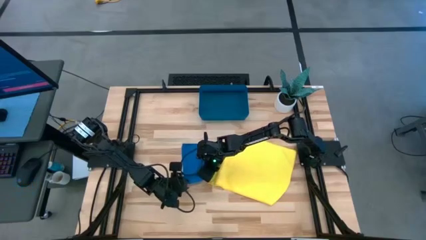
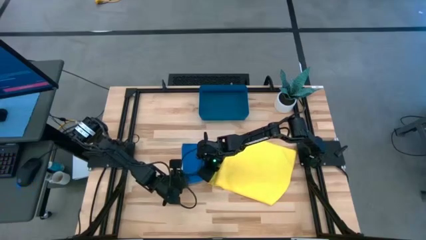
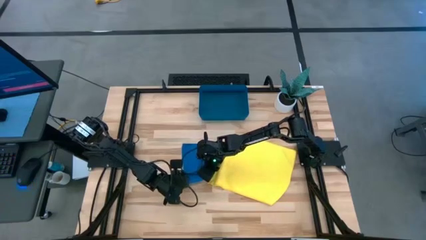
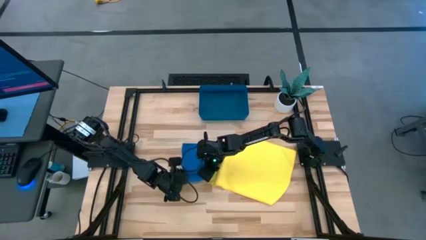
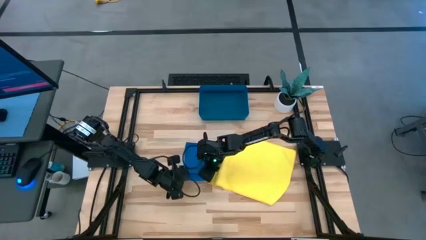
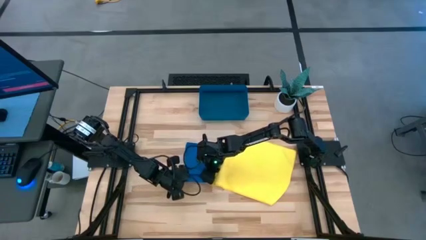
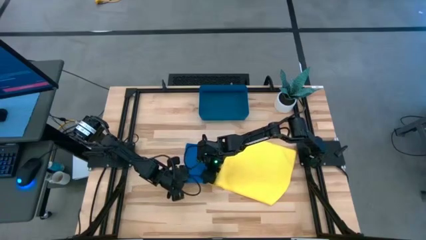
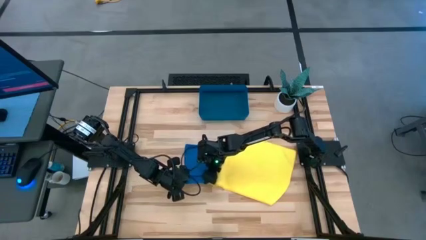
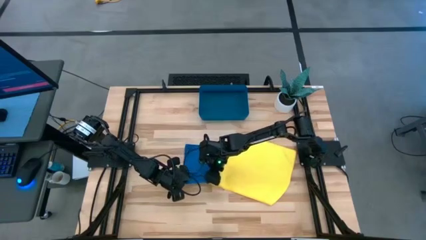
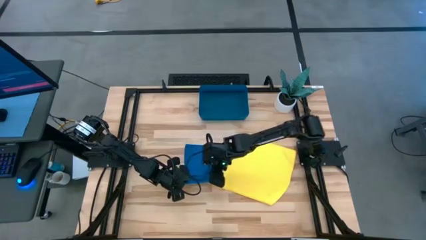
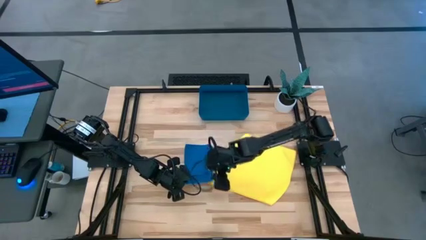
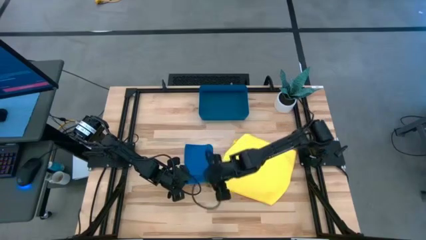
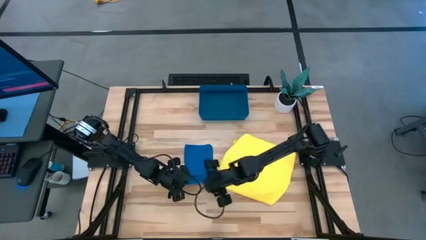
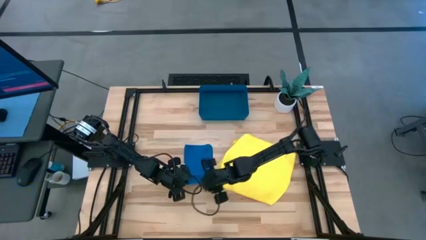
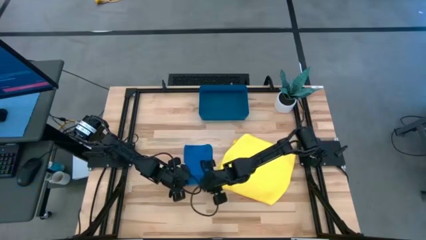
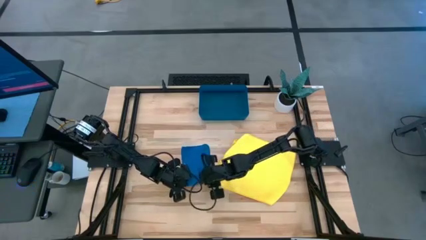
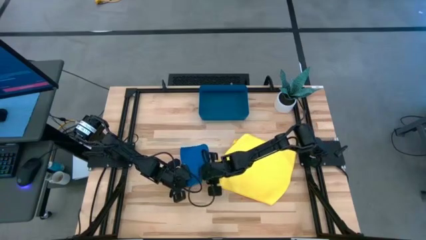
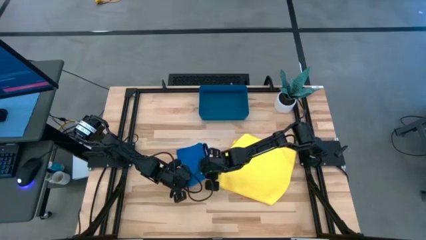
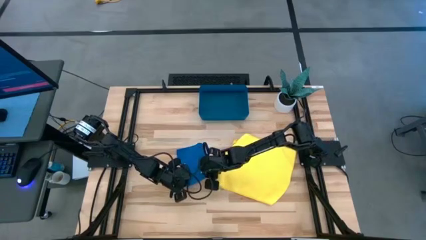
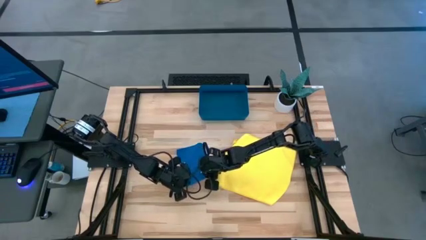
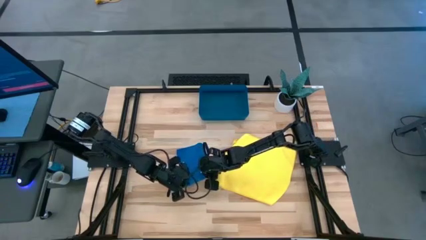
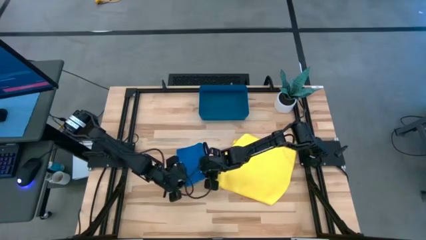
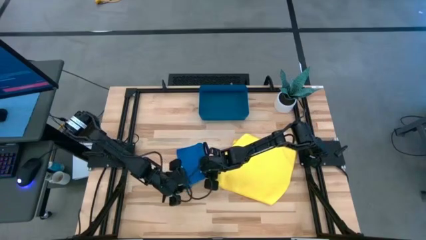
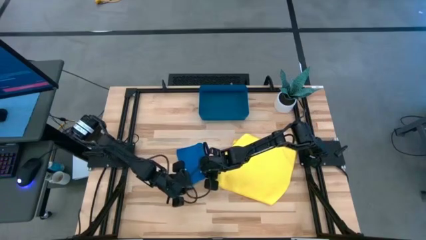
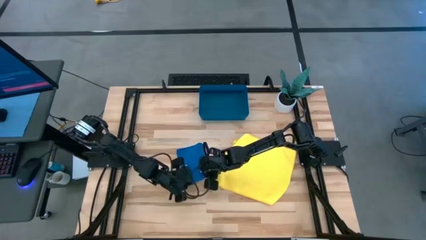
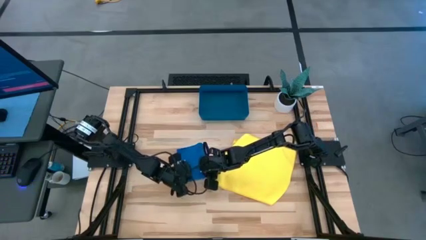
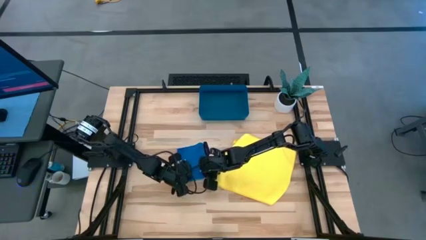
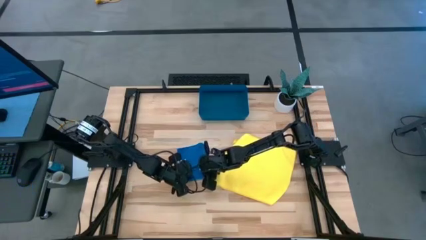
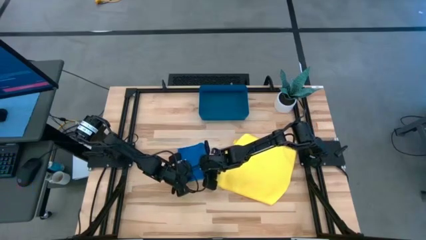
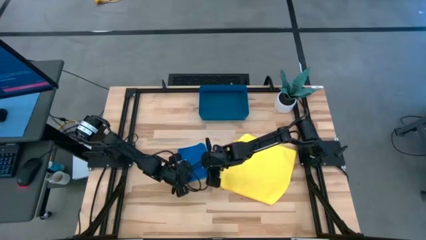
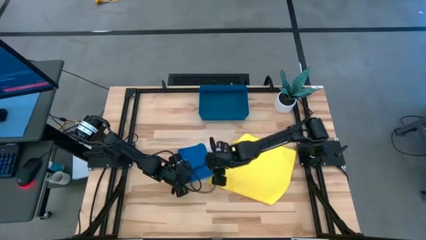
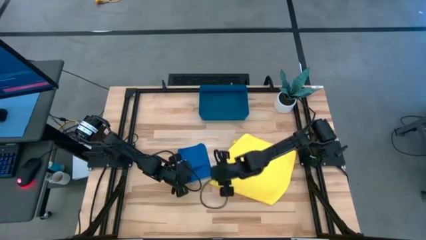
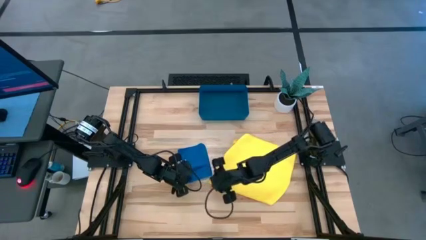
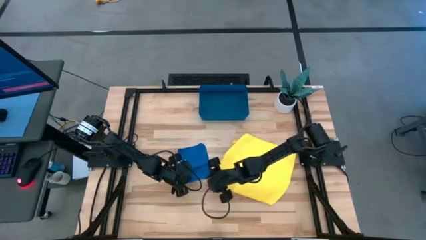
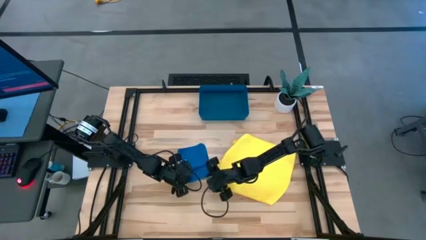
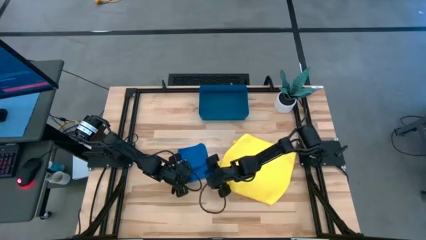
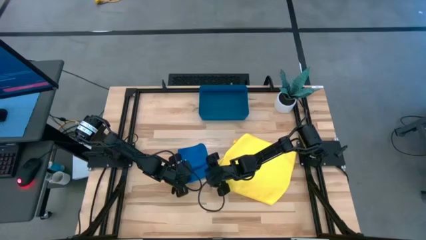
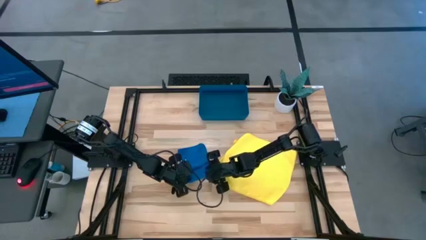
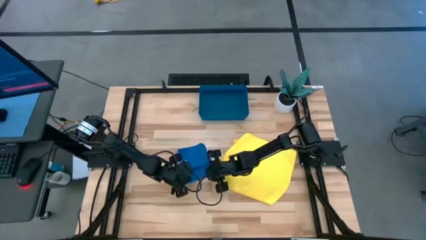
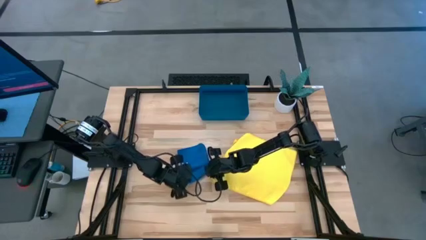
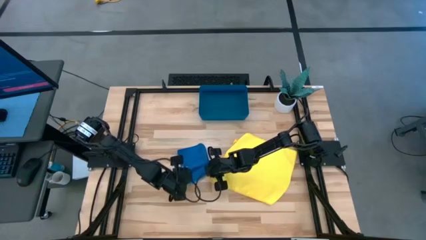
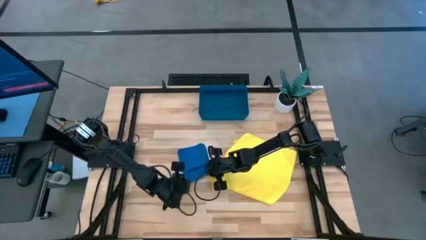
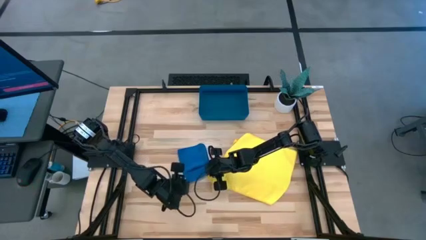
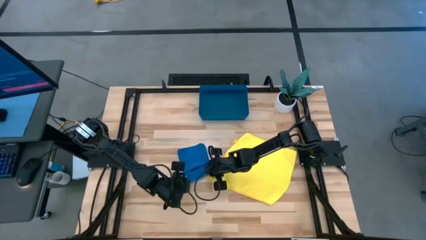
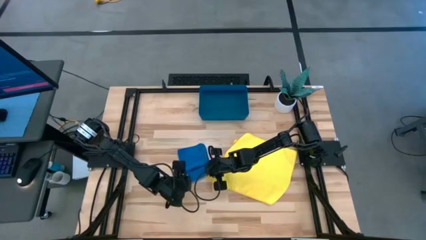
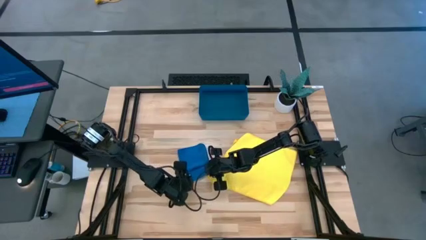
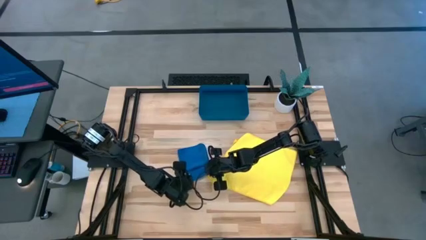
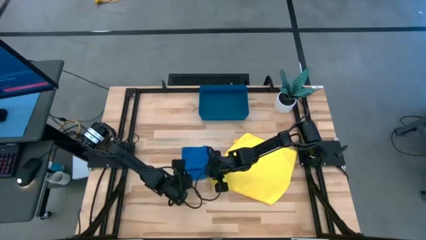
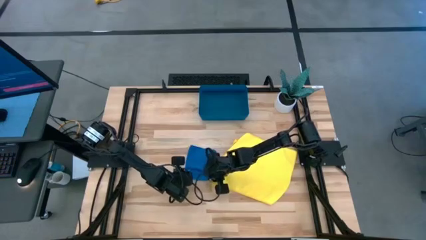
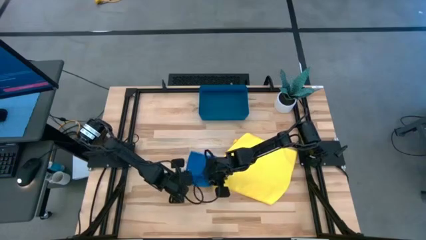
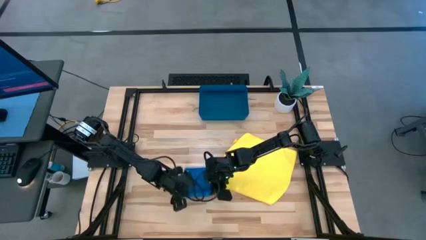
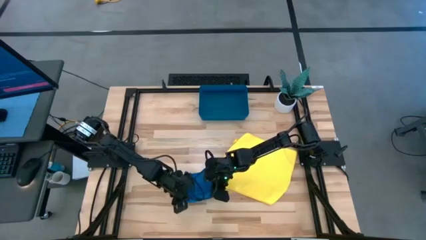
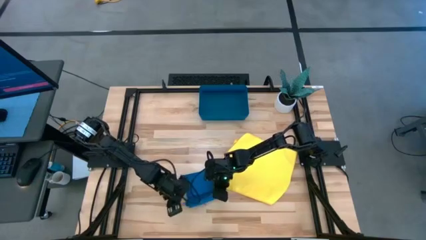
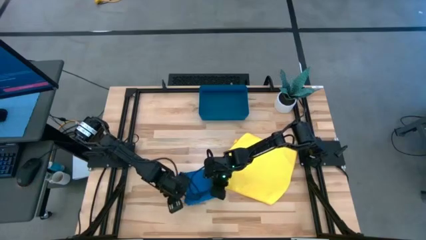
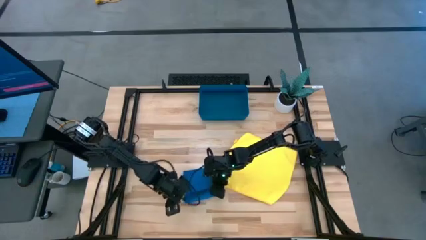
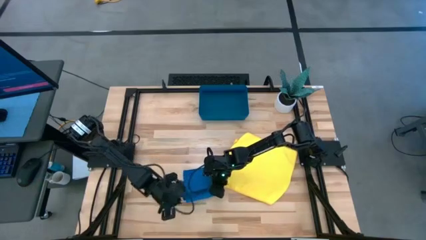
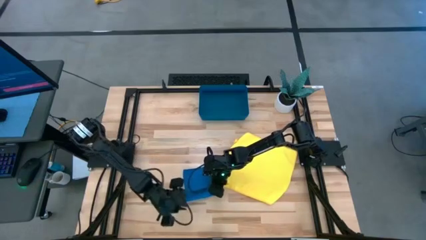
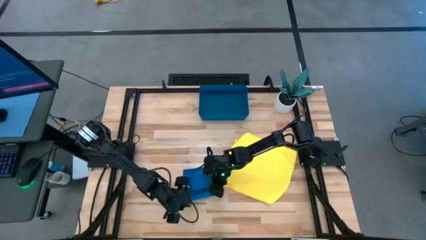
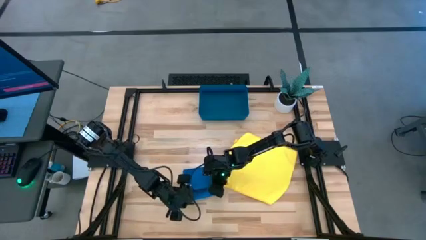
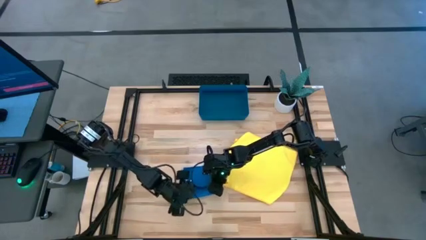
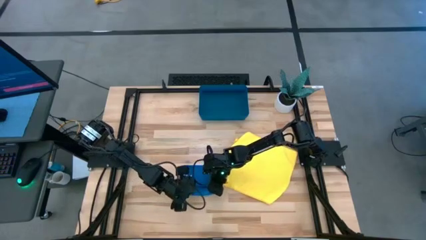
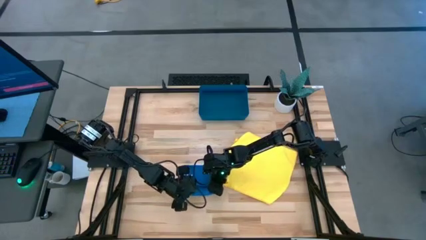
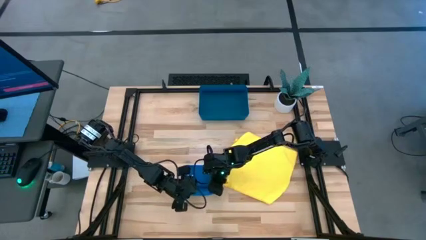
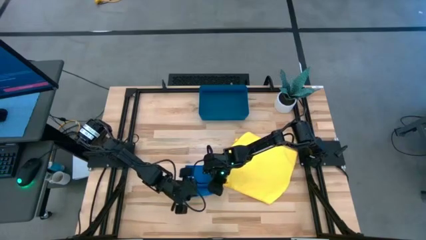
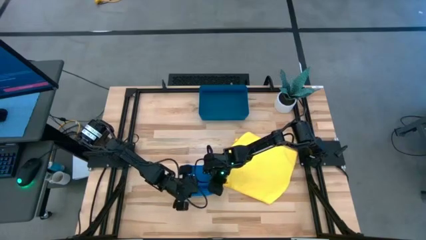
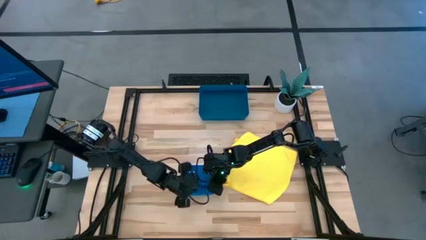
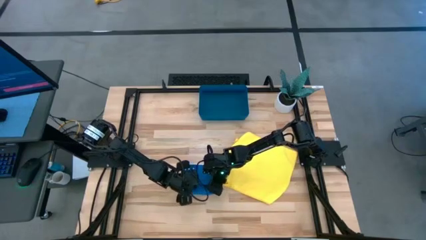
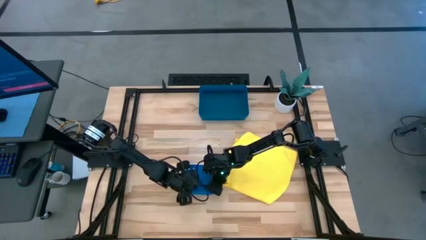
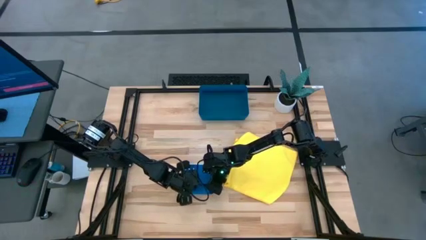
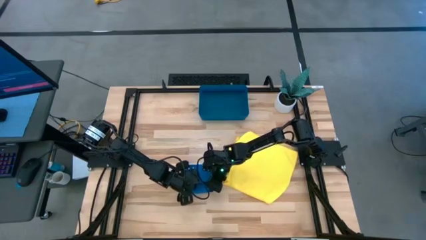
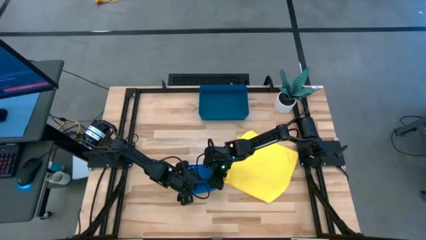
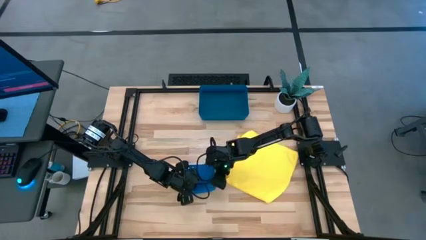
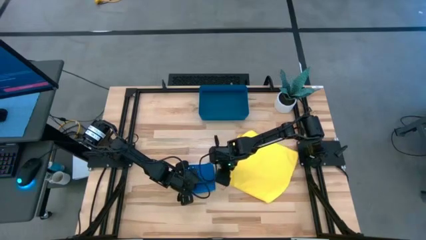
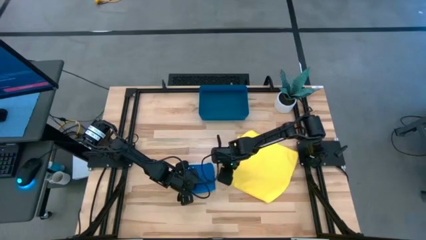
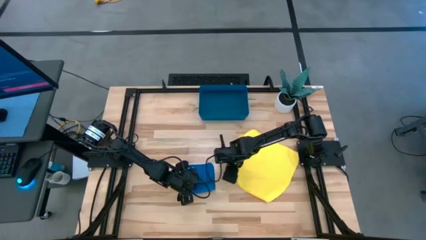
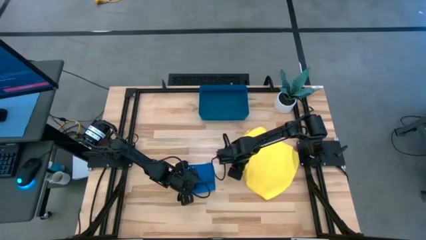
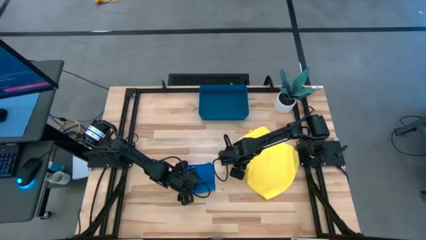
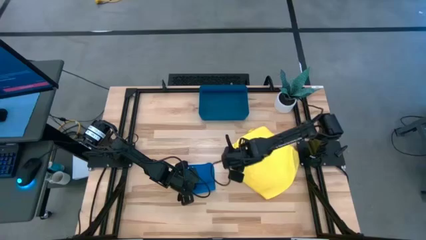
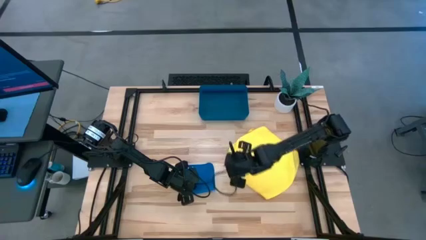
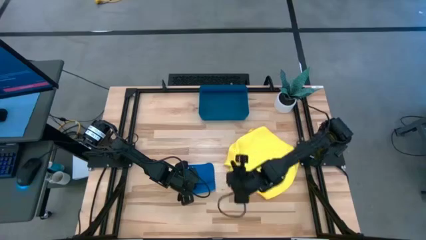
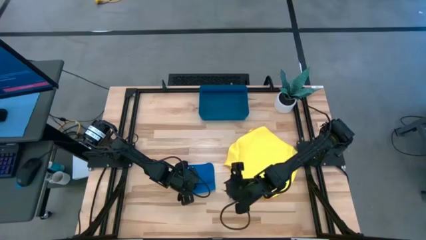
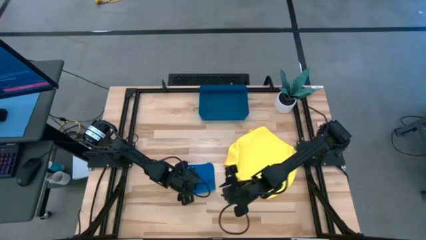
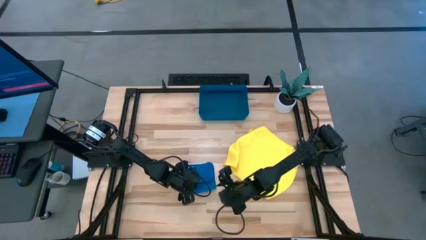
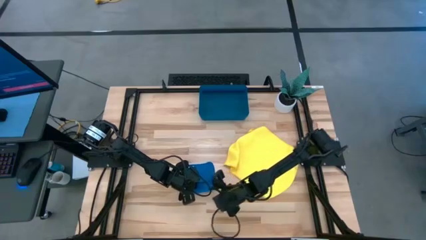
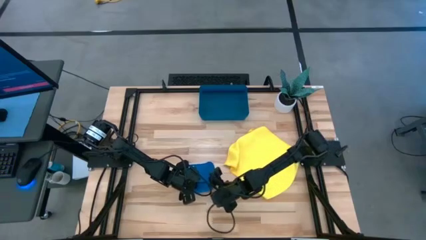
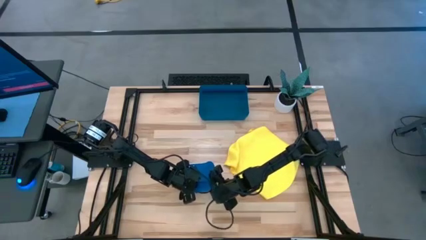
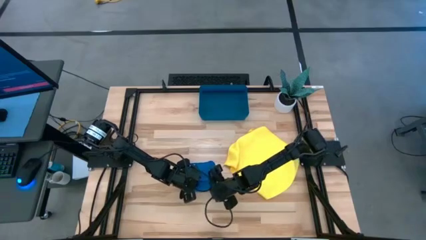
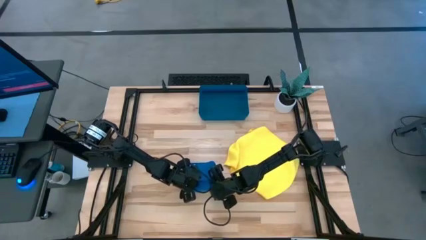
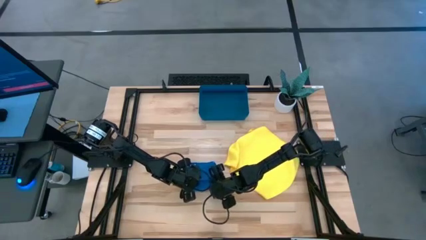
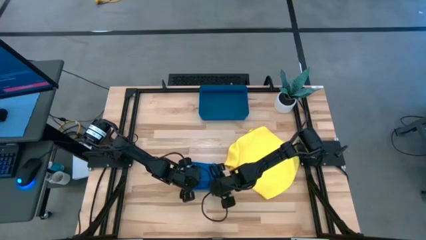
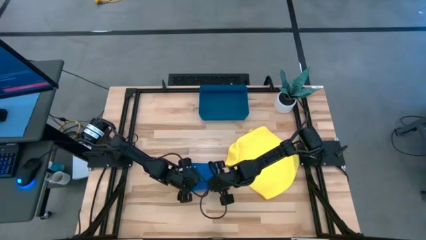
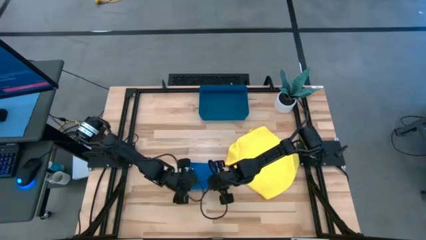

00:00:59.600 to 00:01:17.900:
Task: Roll microfiber towels into tight, uniform cylinder then place into a basket
Roll the blue microfiber cloth
